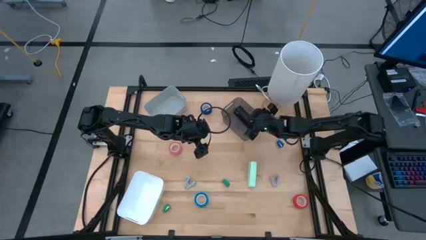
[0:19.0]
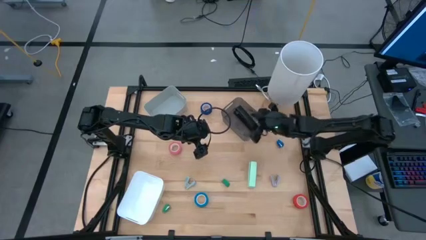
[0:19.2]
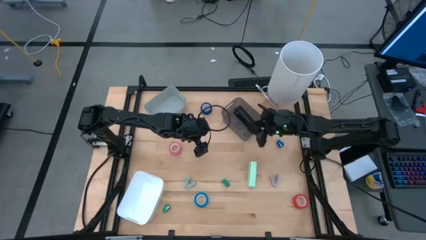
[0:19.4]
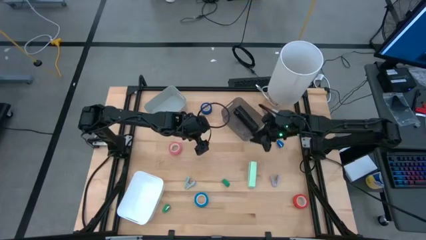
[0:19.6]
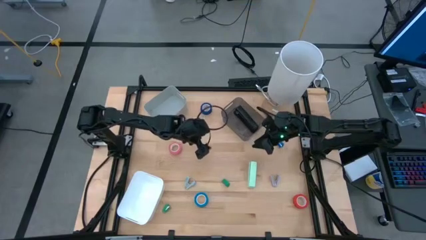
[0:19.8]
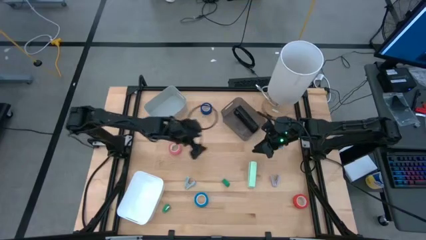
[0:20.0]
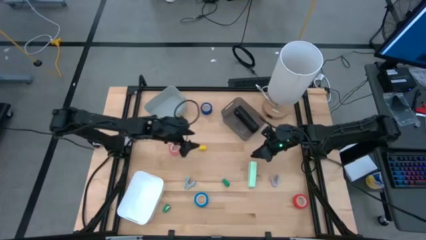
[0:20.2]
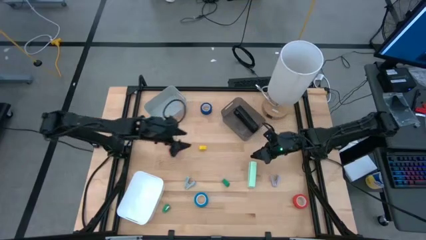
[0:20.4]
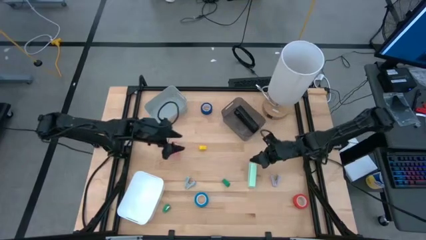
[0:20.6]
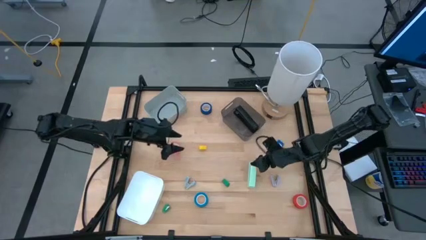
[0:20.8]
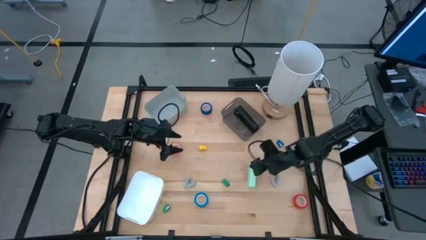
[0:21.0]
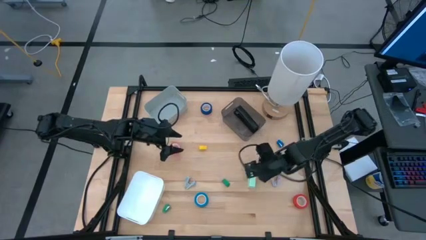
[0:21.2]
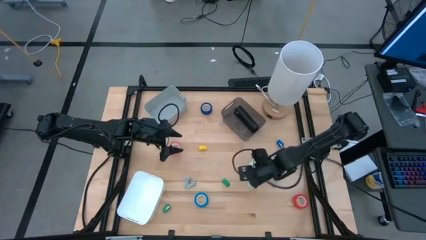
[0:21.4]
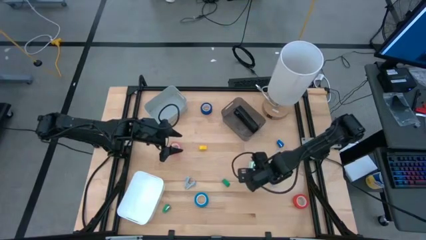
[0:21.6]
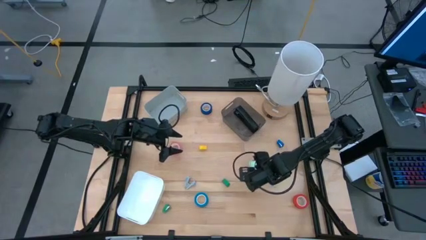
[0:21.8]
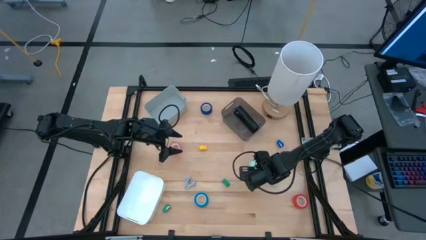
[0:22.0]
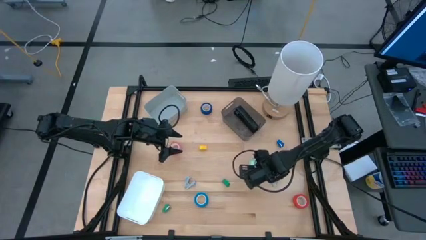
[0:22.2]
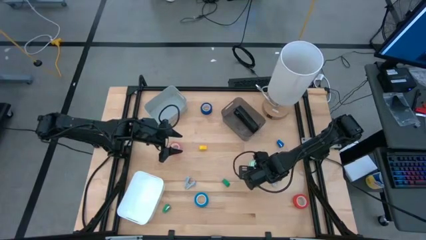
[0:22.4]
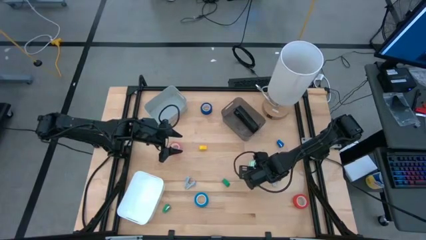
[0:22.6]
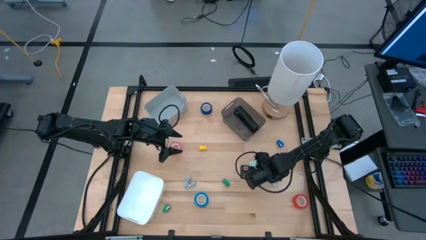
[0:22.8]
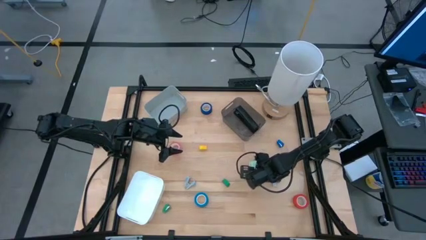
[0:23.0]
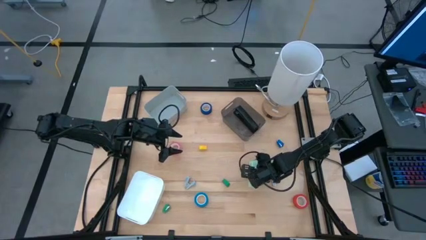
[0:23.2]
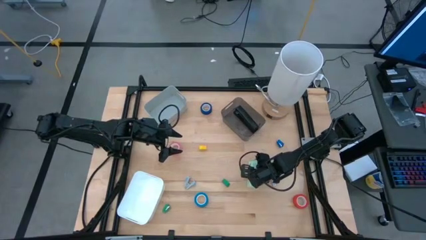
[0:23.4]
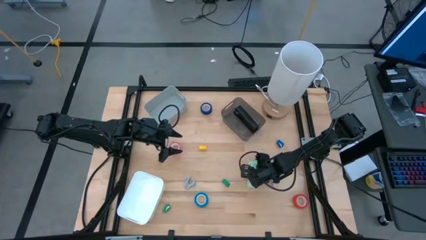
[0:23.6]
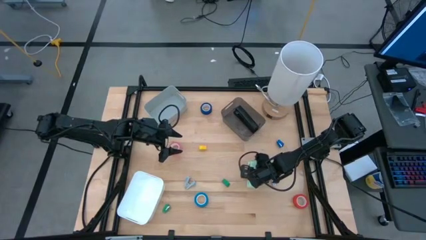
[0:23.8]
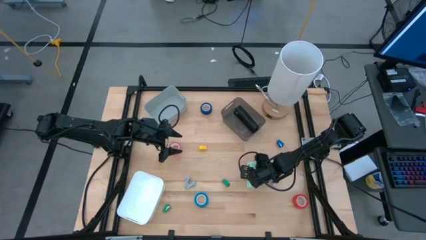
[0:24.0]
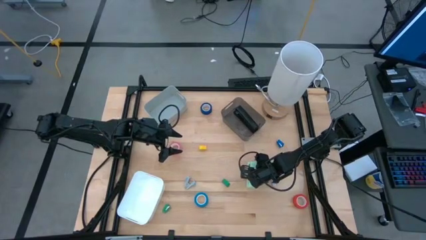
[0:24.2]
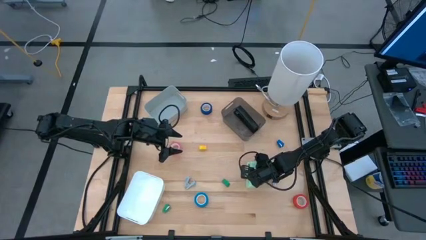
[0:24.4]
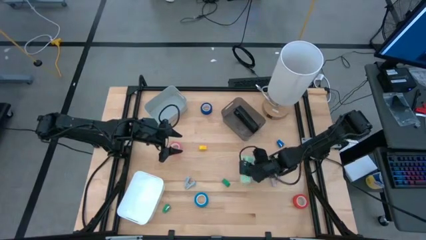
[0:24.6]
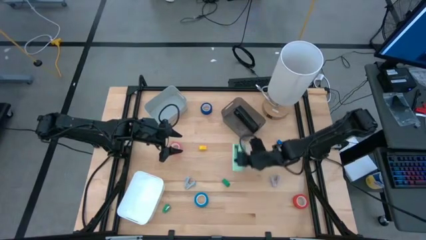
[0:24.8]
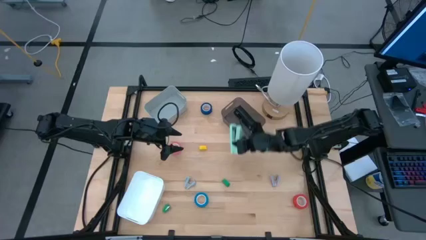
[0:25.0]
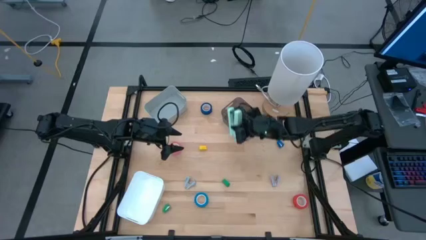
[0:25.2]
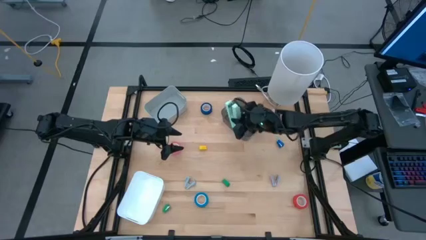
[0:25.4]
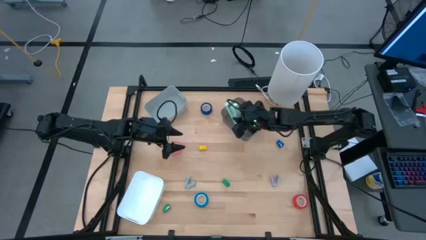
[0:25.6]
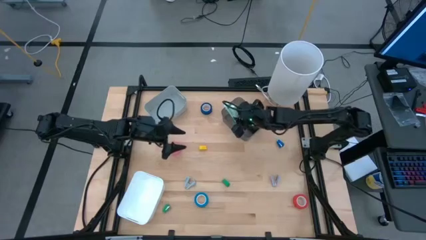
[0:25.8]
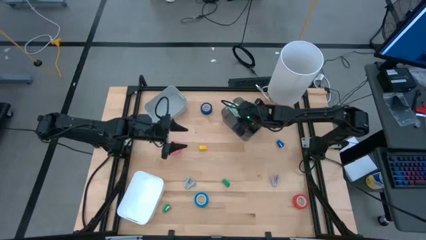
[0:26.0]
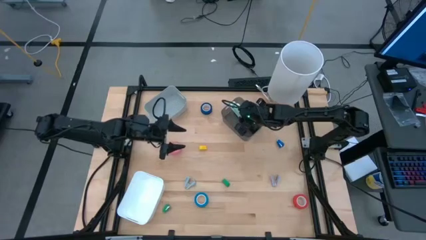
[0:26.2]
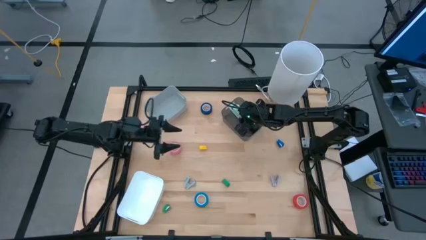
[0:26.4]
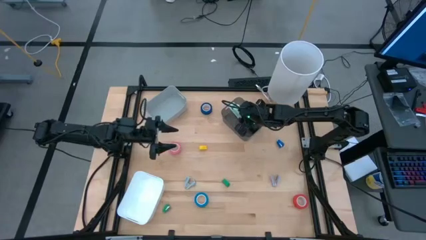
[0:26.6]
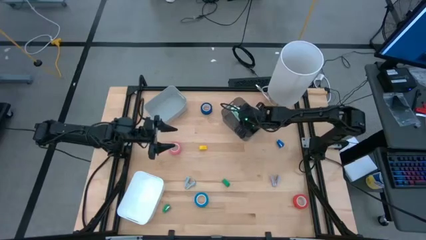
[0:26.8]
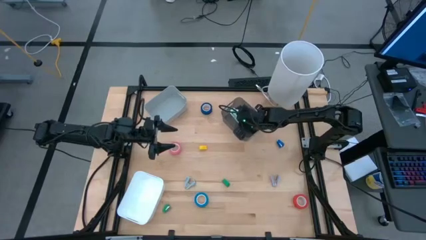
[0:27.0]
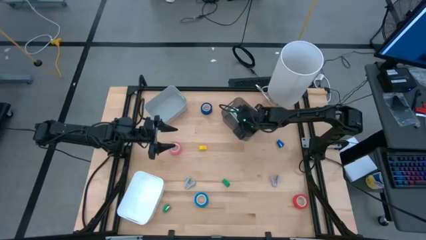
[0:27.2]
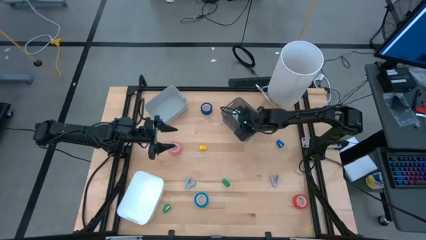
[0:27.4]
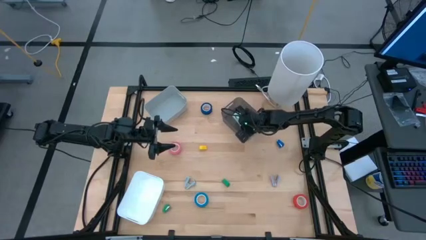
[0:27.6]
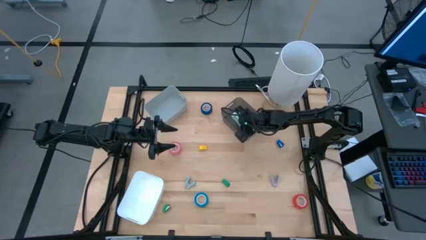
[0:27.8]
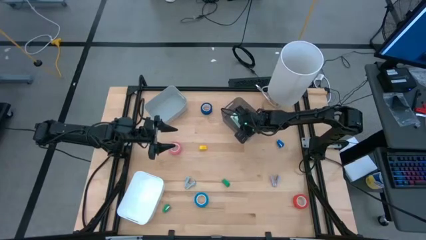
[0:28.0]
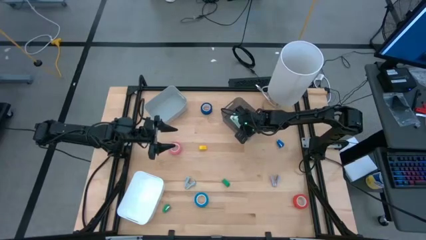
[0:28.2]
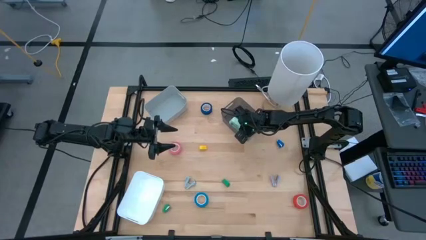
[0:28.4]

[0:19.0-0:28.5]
Task: Pick and place Stapler, Stapler remover, tape
Put the turquoise stapler into the black bin
